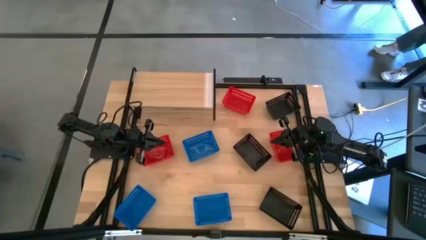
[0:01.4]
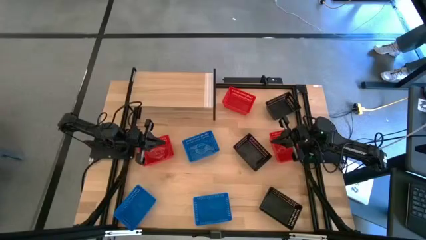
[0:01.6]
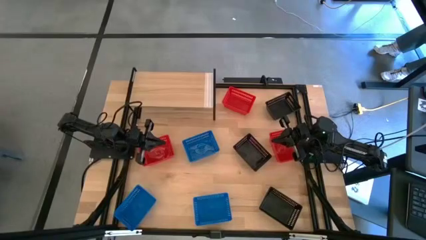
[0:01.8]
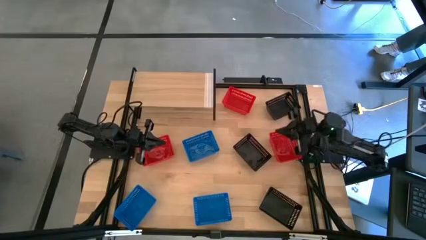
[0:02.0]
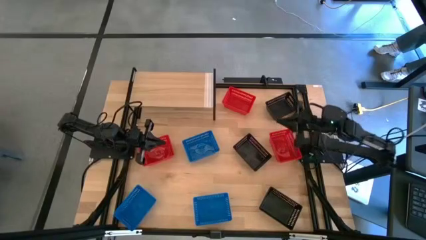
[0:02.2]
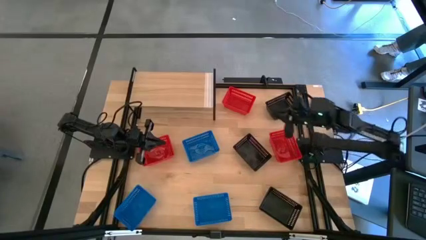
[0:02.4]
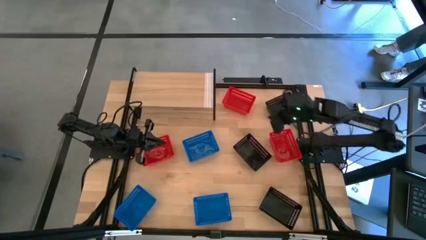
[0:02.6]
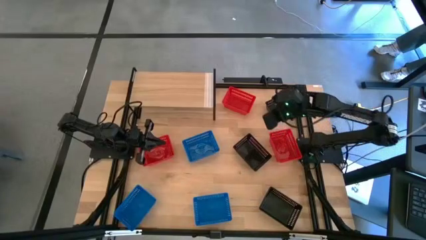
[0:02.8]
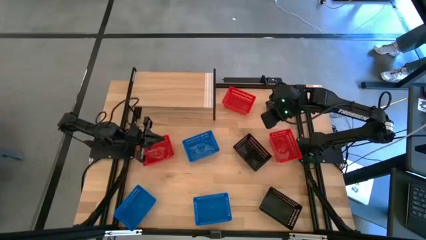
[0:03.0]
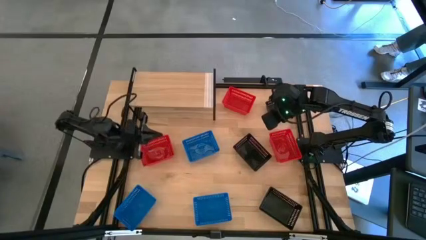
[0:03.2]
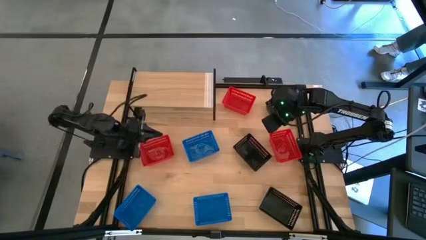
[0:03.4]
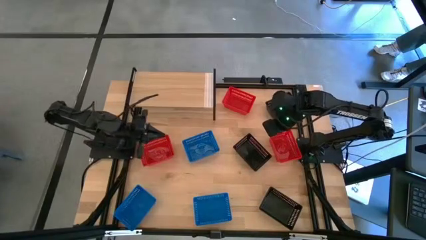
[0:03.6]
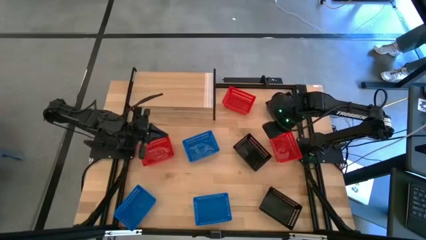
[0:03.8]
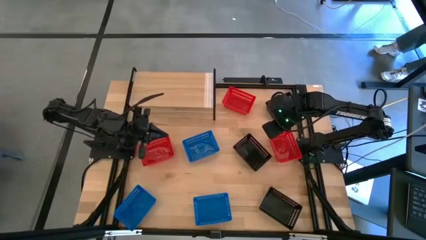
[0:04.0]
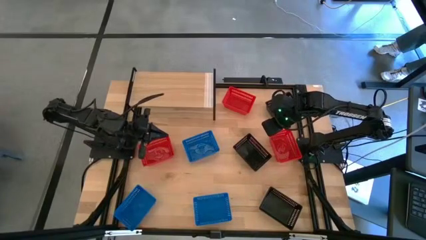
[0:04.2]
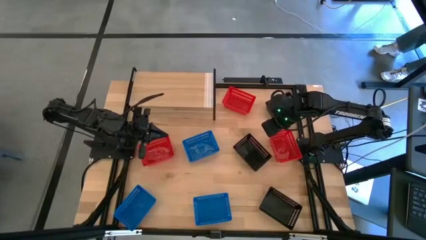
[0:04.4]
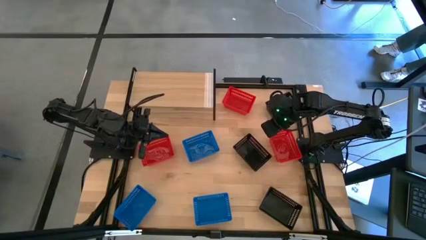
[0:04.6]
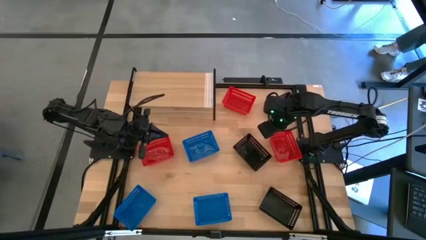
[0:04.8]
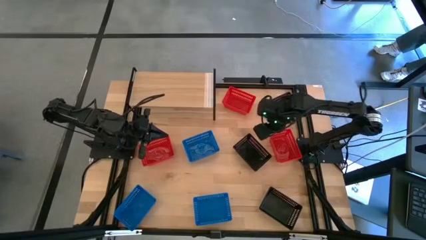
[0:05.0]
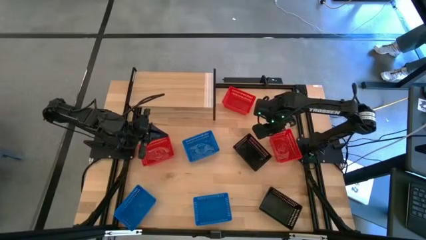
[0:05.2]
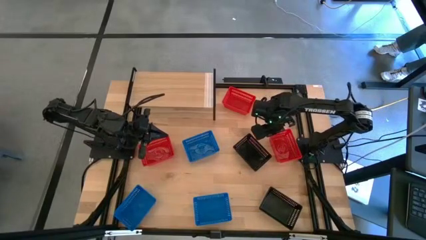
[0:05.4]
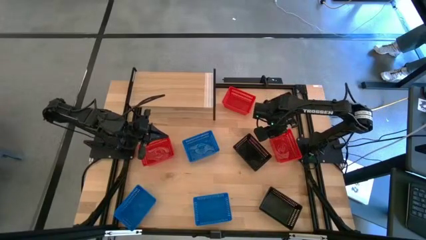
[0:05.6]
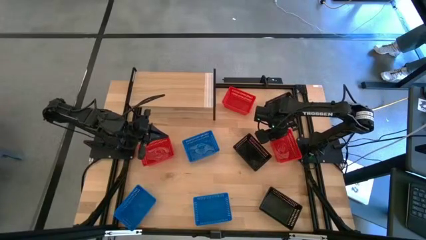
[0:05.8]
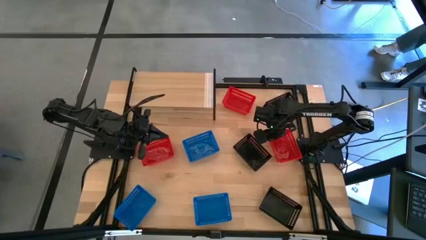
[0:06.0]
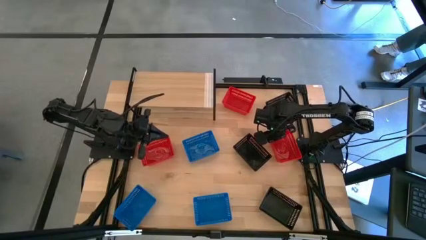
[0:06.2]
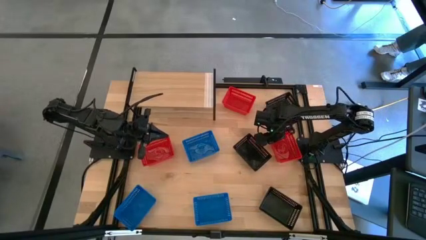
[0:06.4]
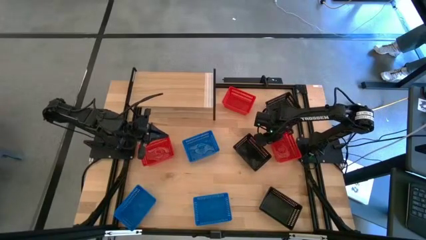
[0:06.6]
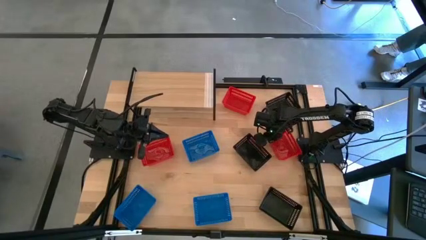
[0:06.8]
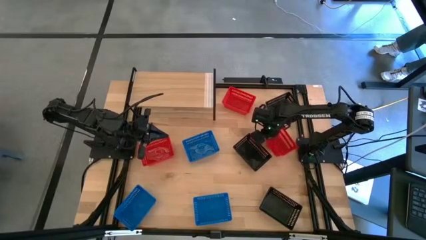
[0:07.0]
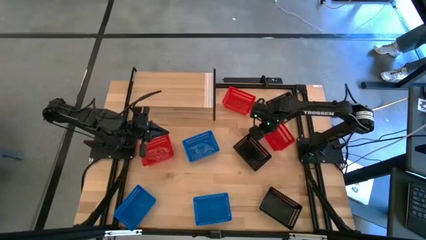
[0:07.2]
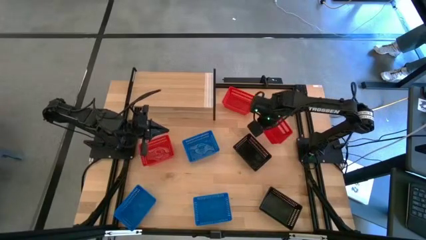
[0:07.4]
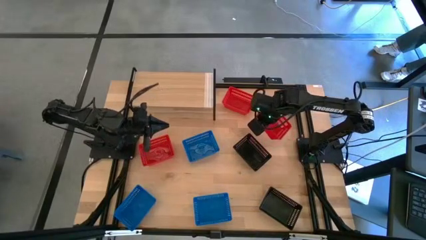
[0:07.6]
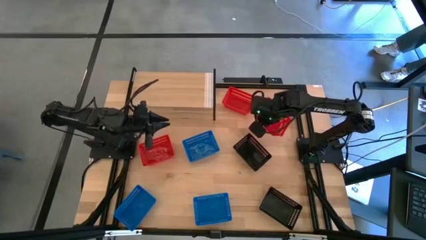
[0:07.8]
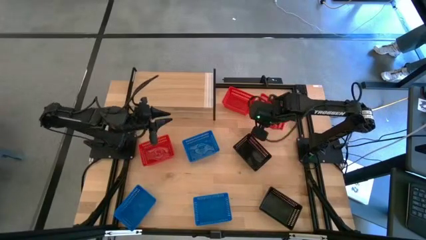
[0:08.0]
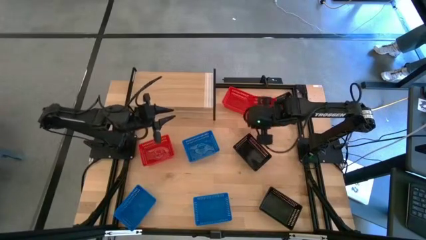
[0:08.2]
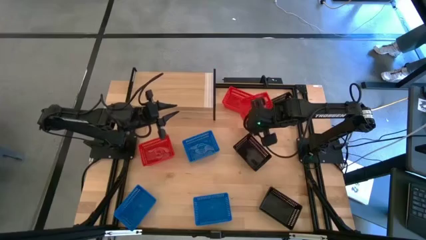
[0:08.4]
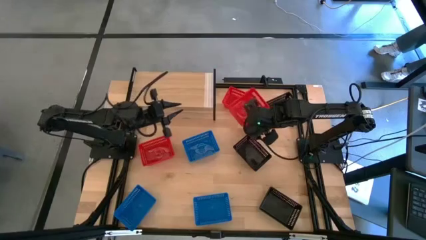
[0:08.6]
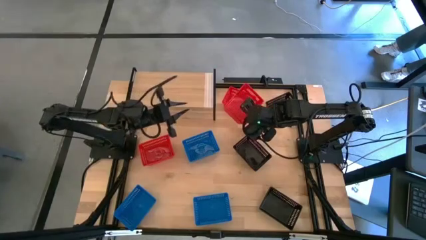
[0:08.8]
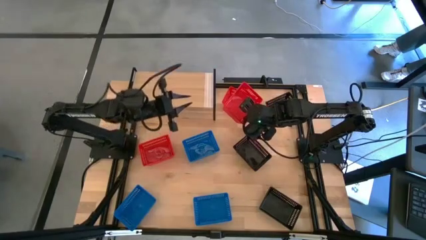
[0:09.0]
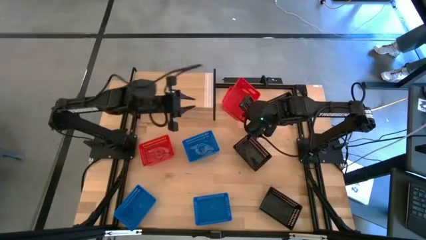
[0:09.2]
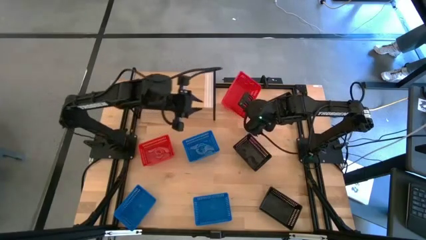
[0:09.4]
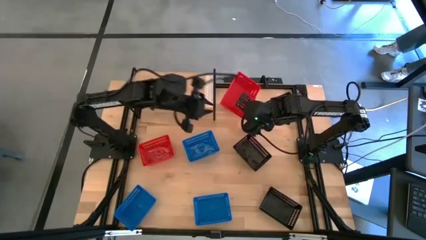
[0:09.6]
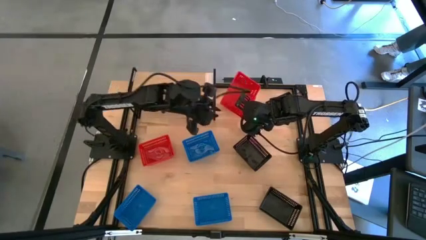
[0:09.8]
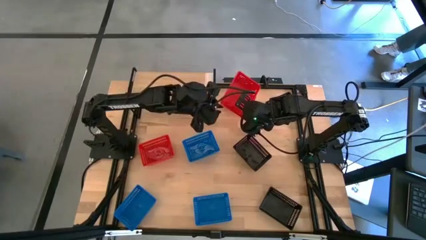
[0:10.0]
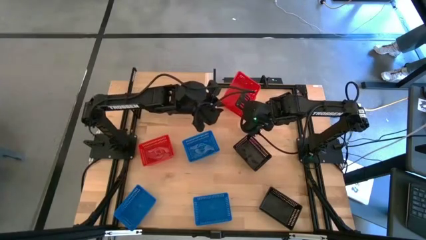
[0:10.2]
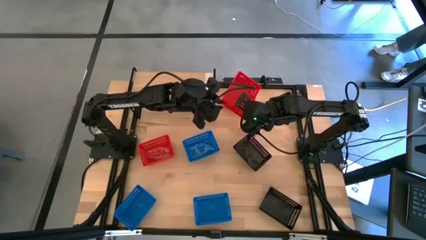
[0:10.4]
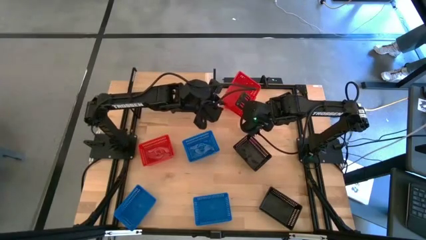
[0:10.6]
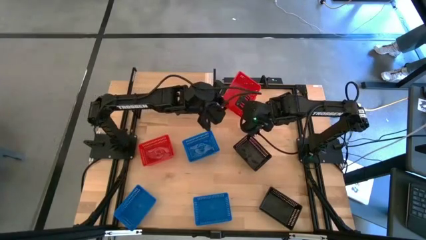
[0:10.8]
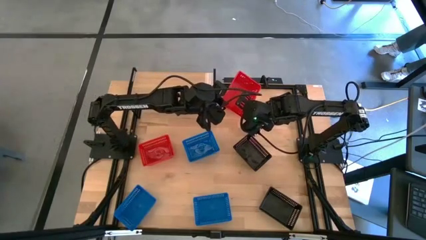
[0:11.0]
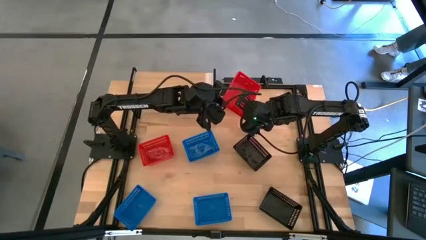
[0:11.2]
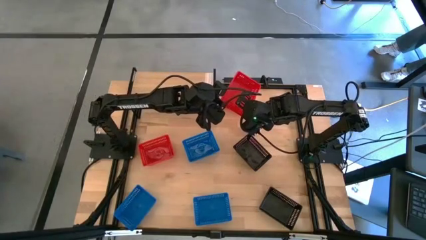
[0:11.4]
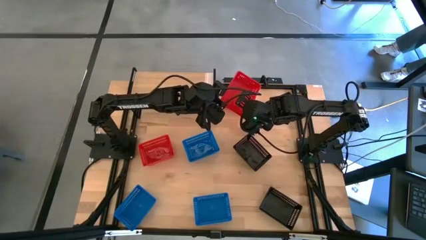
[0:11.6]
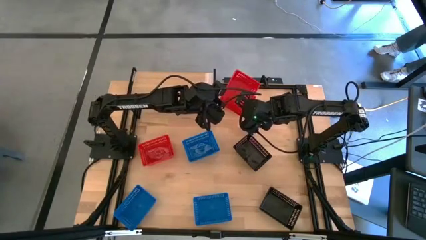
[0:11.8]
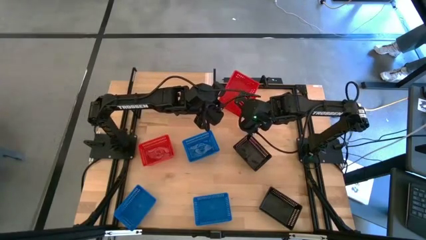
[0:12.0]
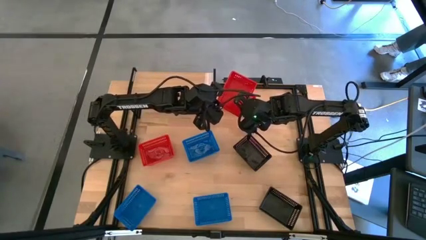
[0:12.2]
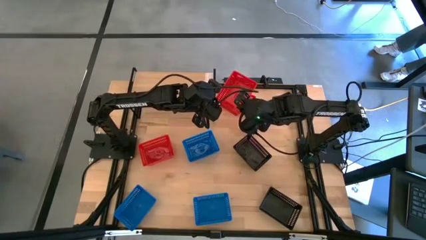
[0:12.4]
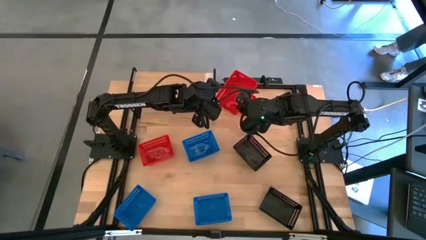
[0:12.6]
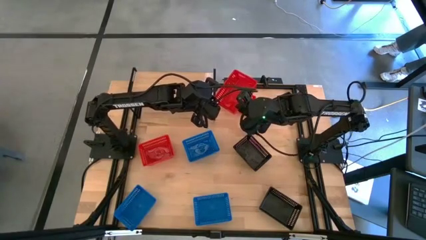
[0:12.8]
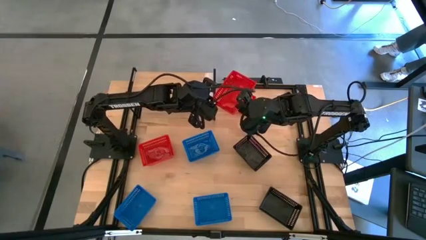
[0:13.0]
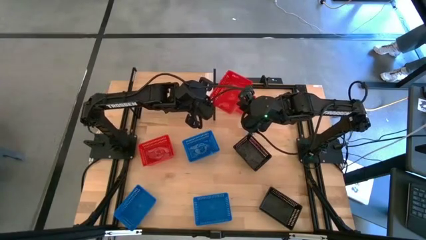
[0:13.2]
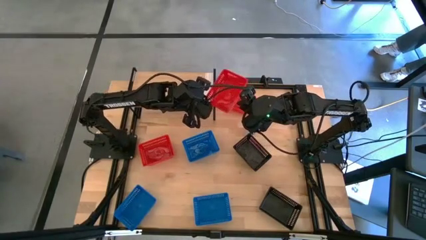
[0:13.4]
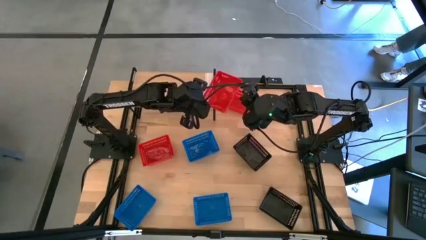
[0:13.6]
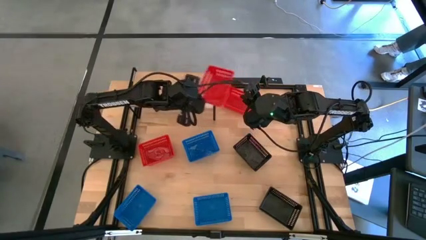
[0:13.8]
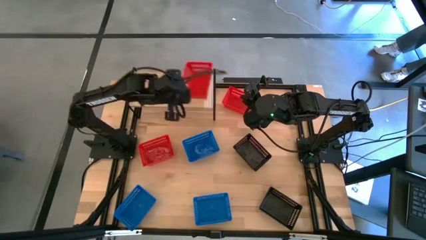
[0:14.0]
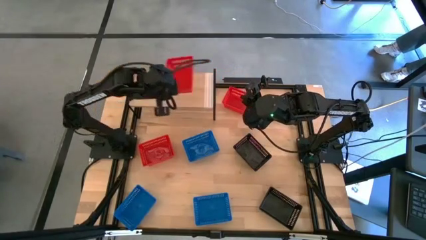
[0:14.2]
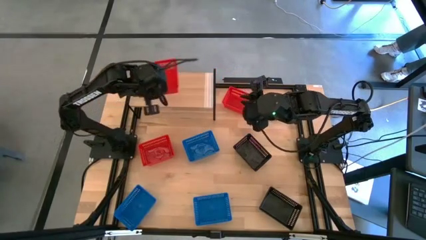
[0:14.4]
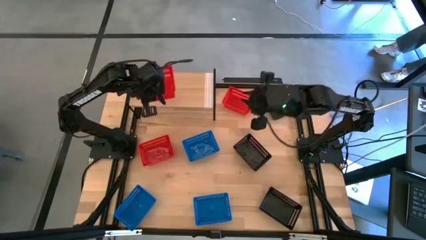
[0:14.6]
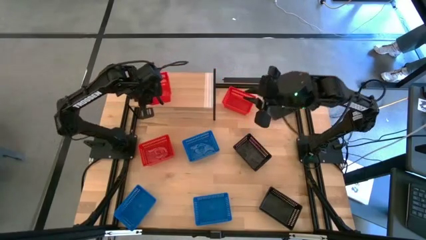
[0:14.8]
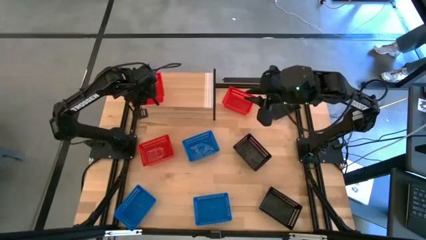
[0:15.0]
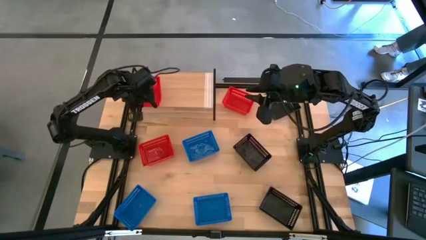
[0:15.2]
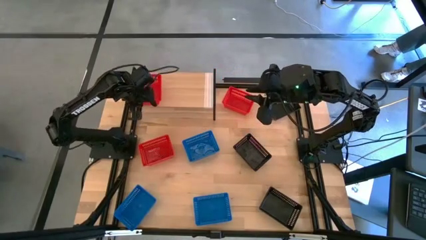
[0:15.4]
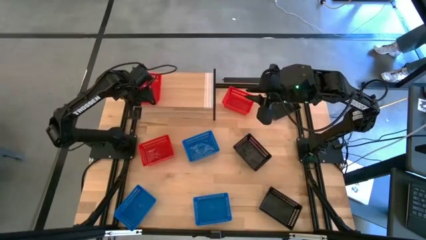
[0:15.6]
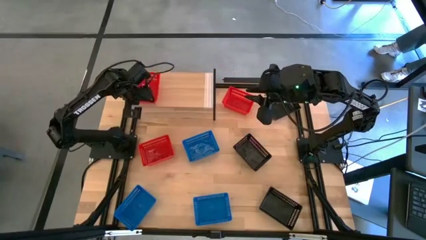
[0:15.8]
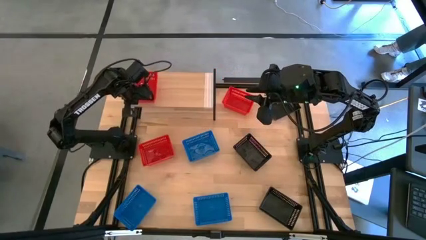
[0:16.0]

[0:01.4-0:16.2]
Task: Stack baskets on shelf by color
Put the bottom right red bin on the shelf
